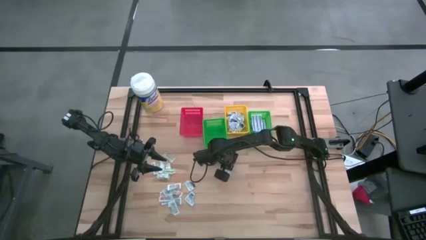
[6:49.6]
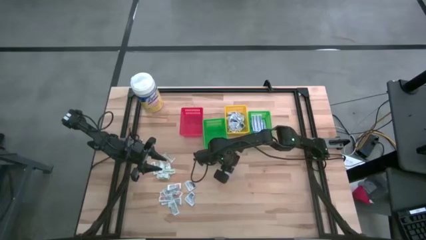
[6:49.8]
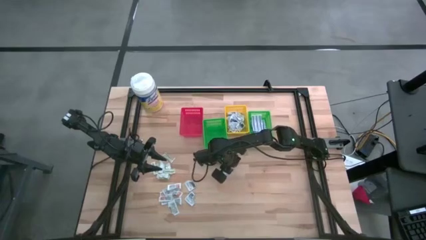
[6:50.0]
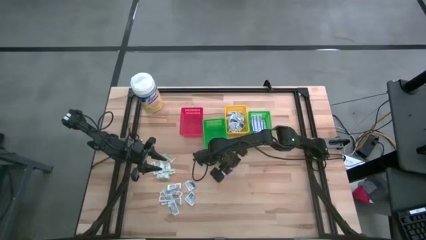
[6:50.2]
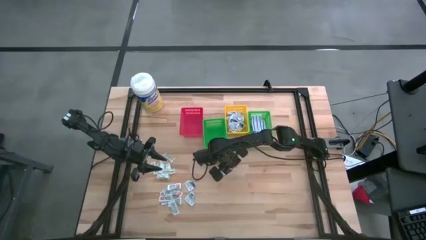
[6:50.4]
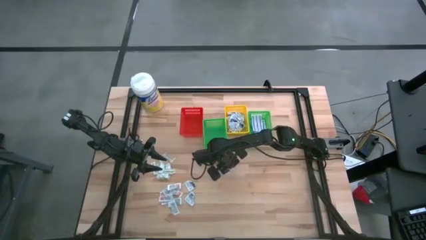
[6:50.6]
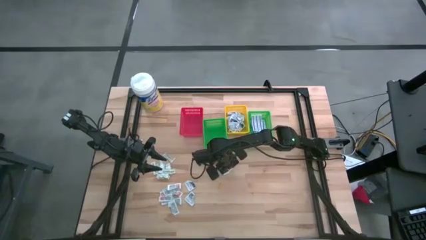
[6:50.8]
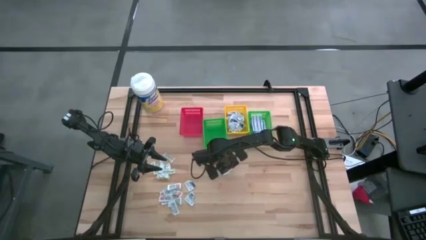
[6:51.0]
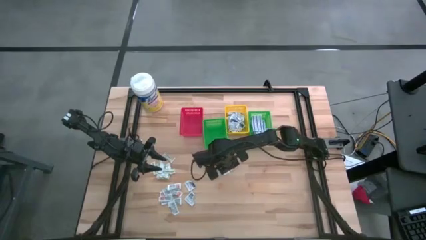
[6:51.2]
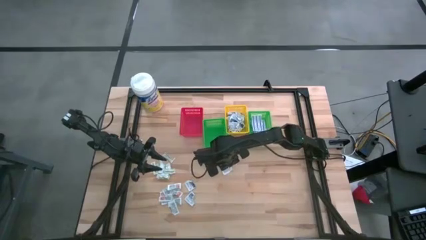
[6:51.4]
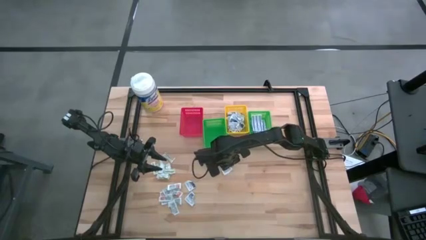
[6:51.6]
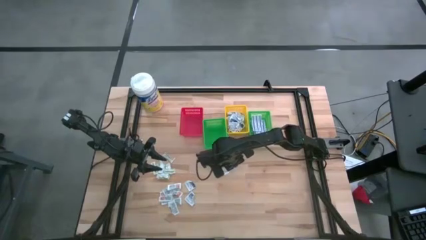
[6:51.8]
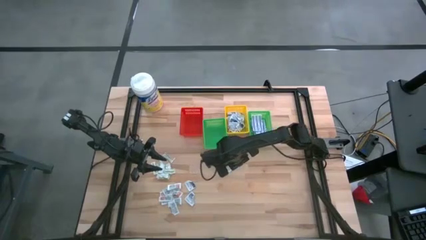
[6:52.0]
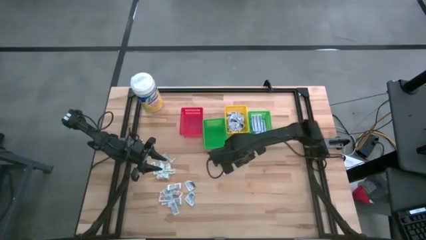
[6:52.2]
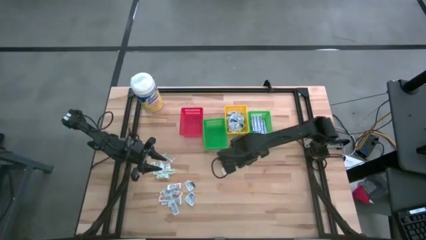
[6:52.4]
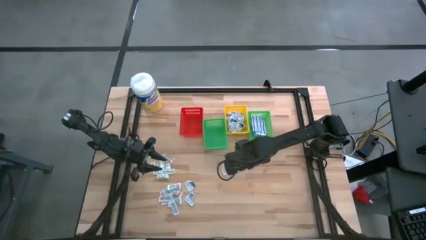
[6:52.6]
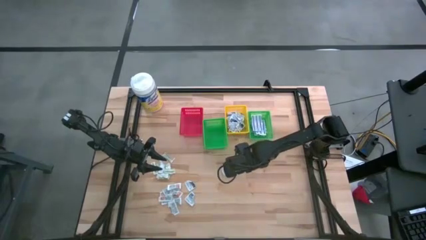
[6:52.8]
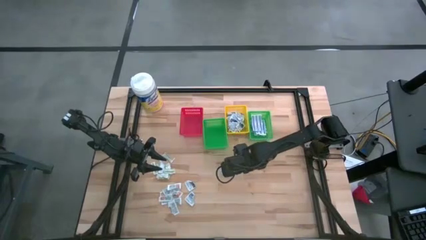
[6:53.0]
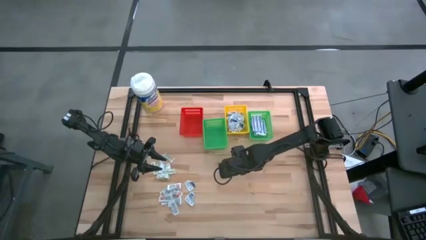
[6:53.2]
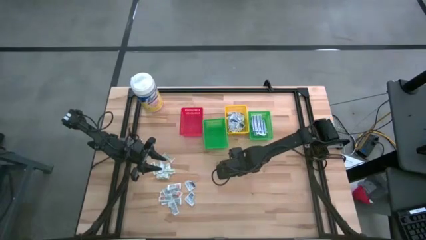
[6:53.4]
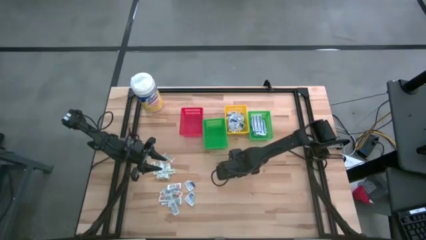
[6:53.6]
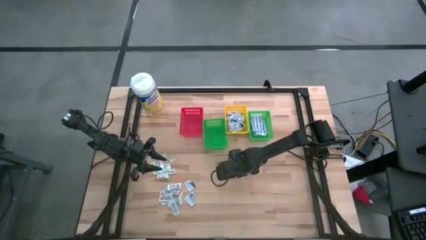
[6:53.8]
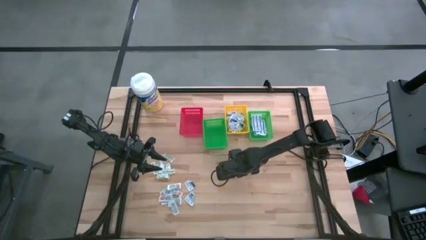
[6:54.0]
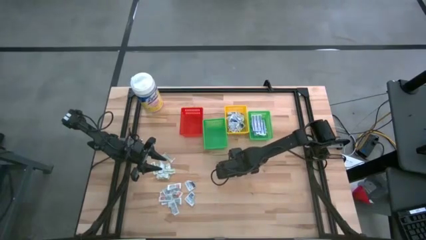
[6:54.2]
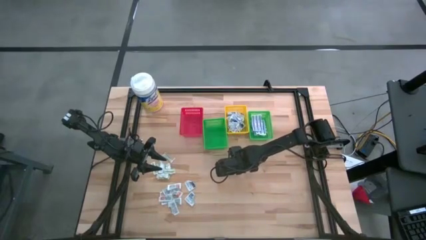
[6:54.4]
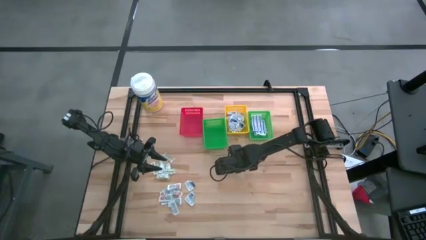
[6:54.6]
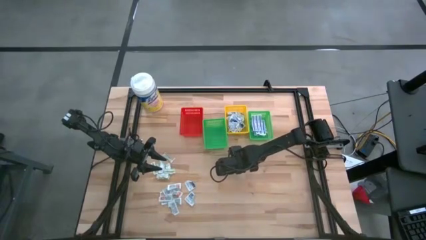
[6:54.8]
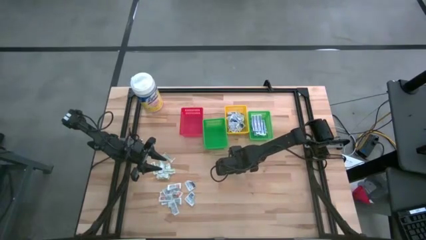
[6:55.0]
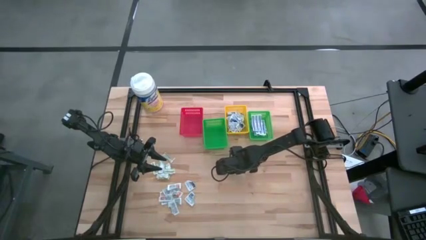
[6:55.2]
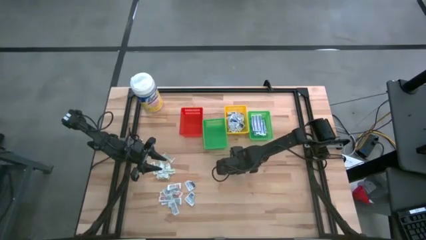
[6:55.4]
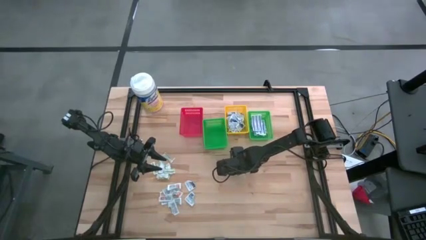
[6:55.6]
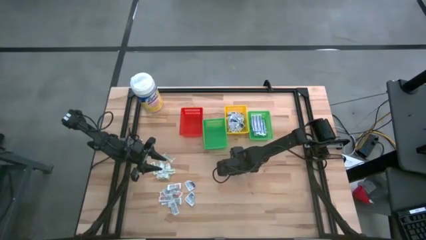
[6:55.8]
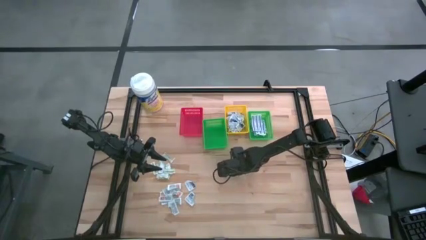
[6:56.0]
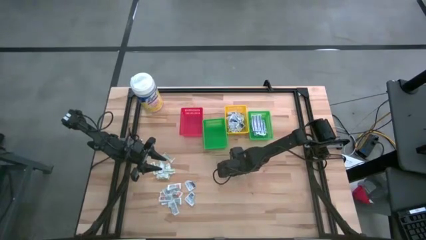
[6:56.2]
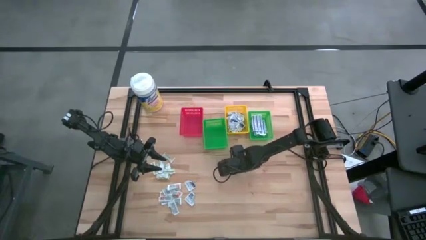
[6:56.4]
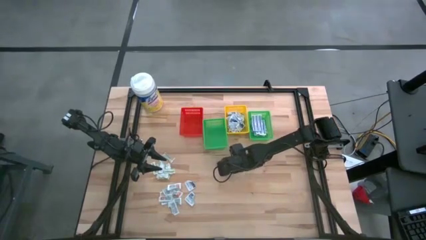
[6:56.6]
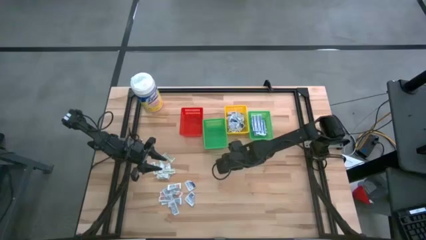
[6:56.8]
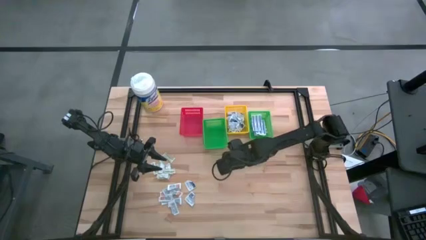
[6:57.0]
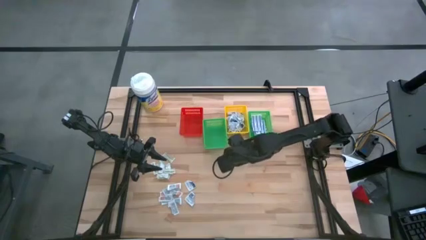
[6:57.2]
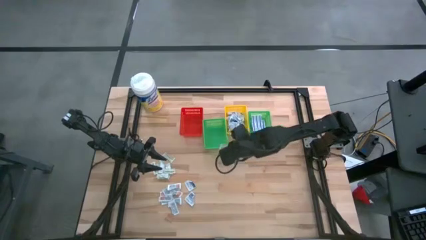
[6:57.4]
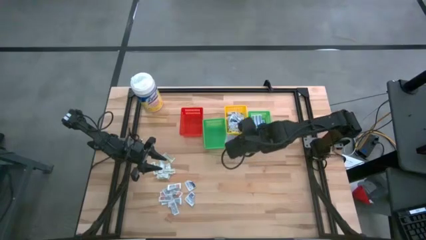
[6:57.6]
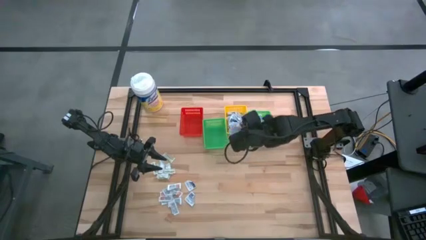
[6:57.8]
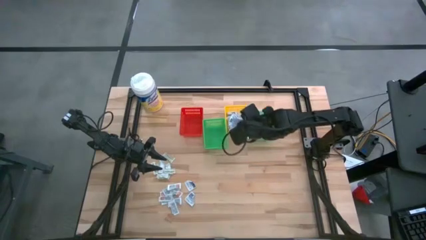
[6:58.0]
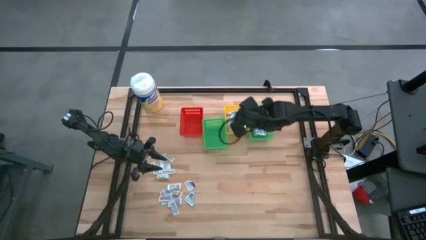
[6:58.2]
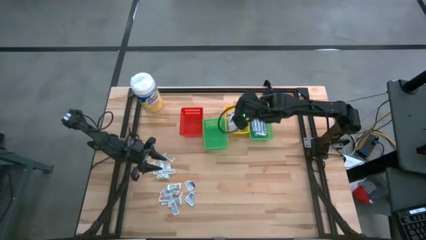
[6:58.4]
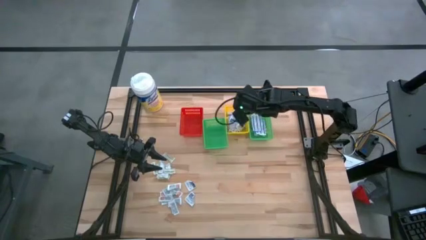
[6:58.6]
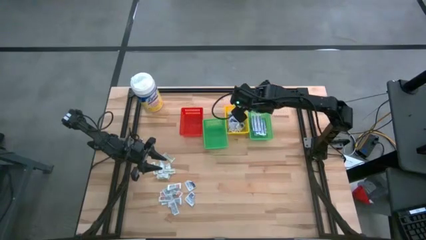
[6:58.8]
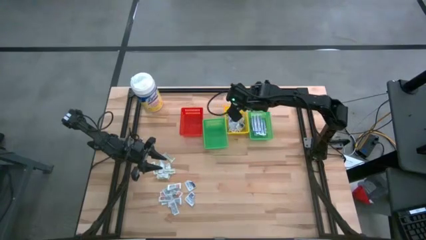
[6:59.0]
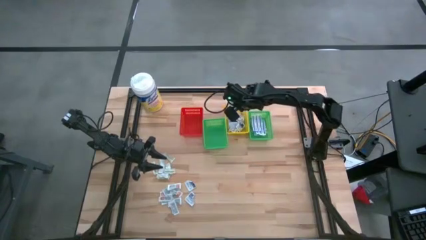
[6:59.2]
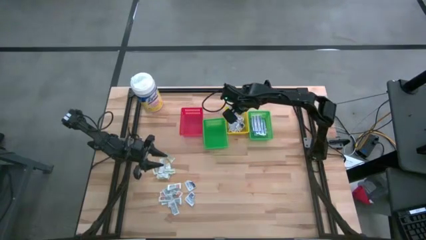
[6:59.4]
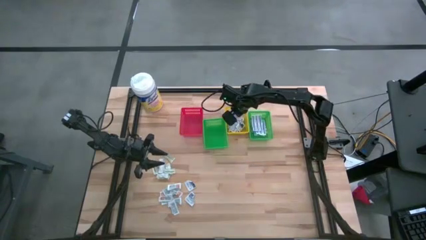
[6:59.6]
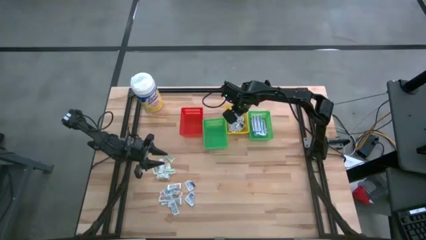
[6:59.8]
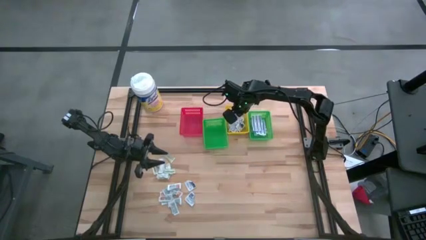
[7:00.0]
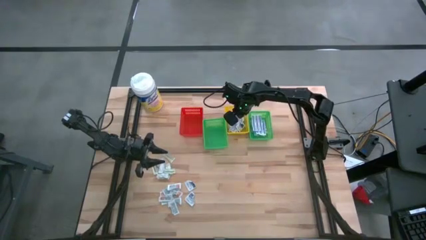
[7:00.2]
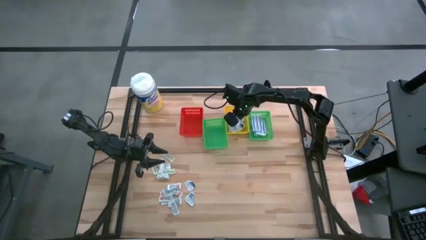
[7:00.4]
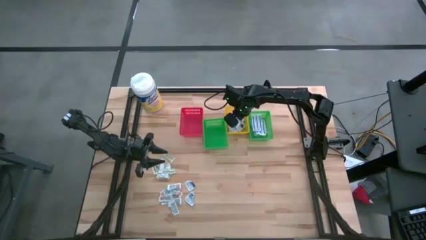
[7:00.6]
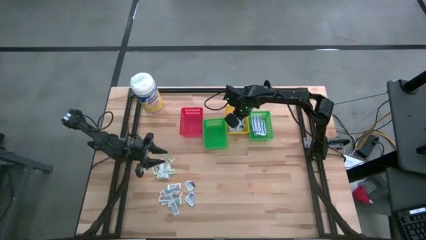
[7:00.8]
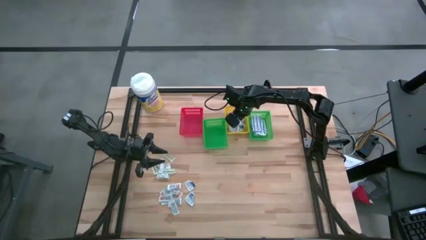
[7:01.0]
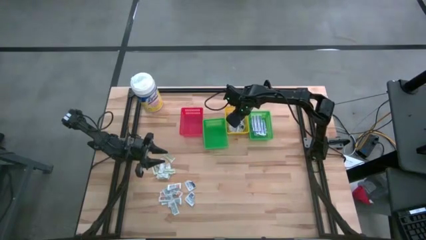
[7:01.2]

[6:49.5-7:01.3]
Task: Pick & Place First Aid Supplies
Put the alcohol pad into the yellow basket

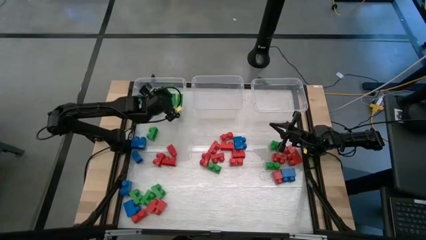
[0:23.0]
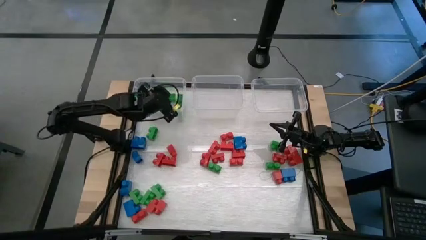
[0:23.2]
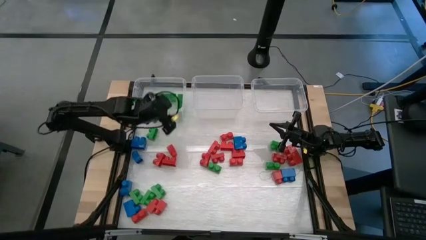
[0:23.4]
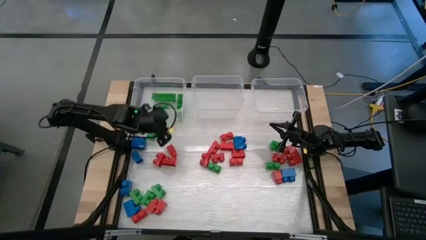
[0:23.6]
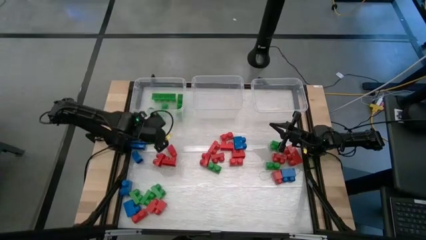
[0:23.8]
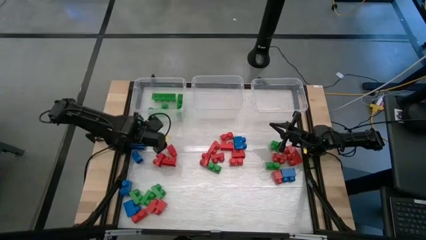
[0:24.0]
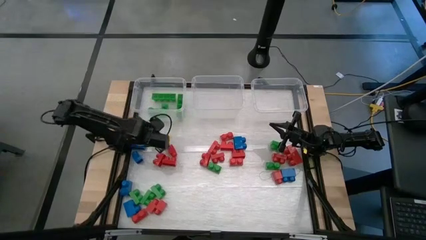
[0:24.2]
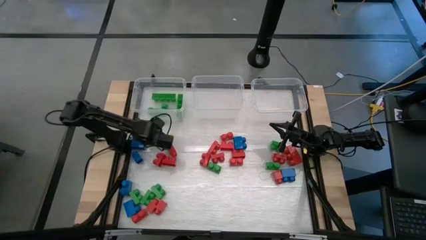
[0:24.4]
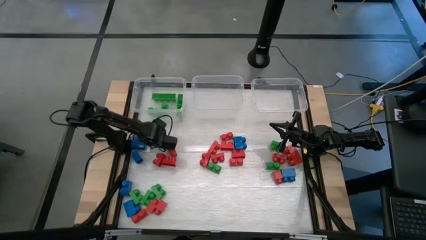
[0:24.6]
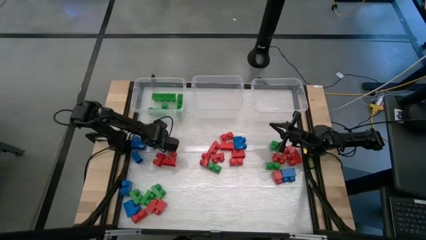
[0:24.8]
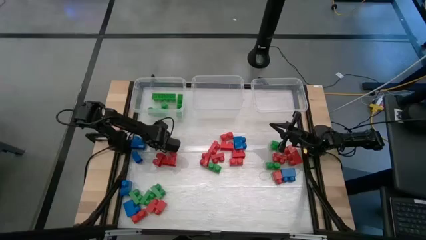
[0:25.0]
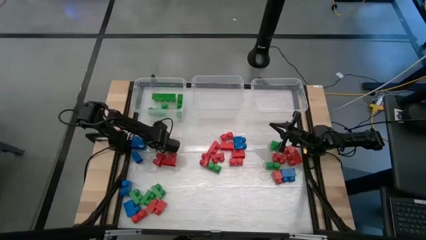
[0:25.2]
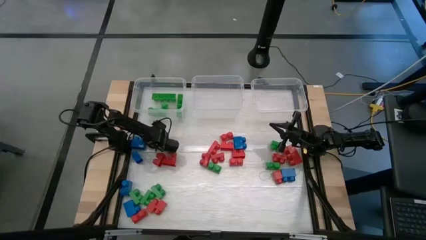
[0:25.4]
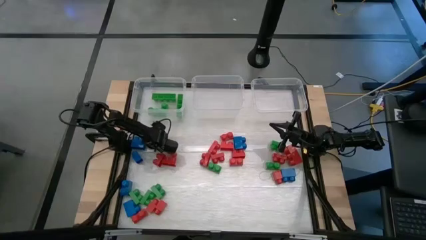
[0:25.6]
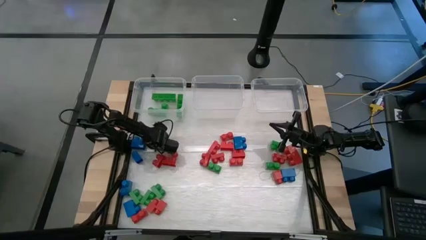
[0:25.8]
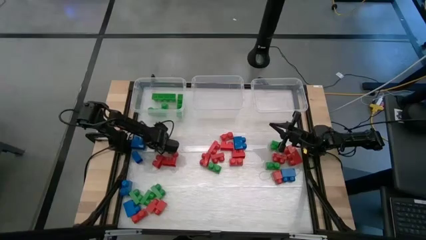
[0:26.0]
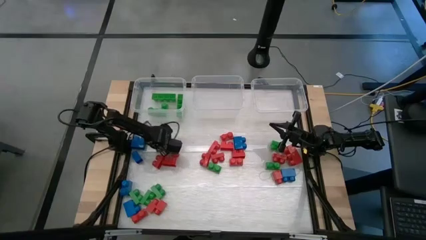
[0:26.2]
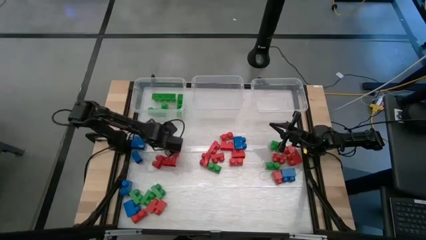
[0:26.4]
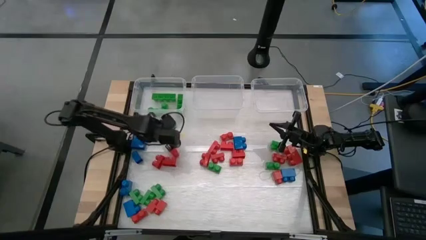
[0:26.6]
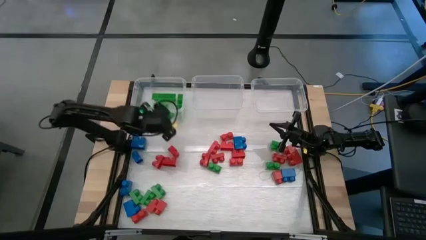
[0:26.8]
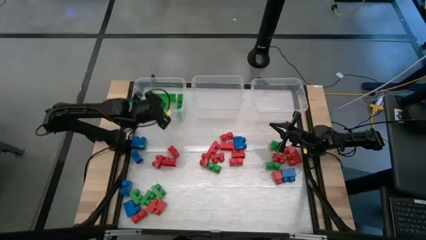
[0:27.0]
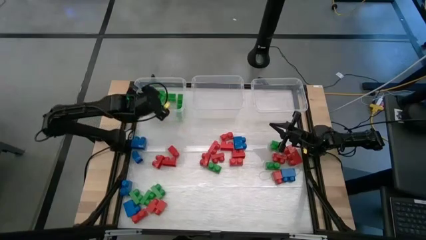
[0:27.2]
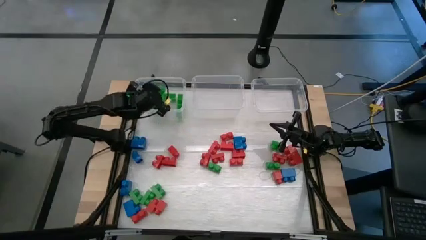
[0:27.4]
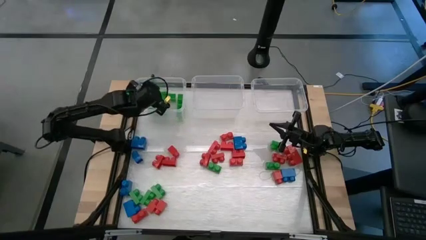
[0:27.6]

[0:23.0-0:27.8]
Task: Sort blocks
Put the green game piece into the left transparent bin
